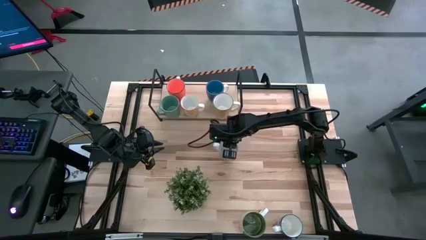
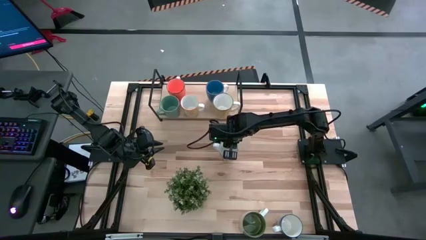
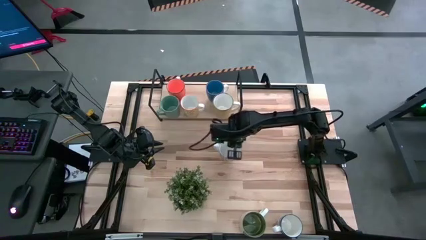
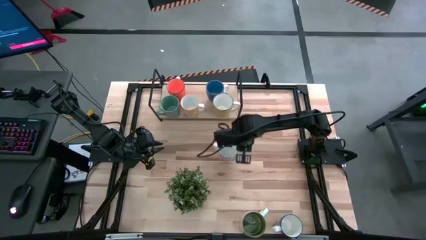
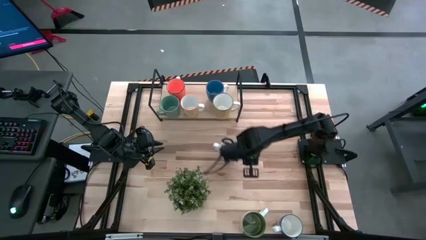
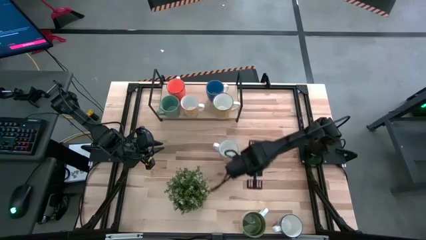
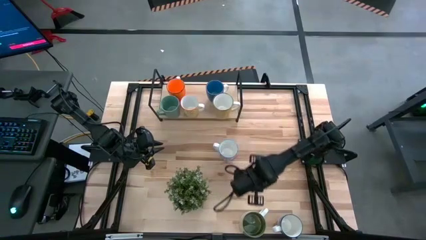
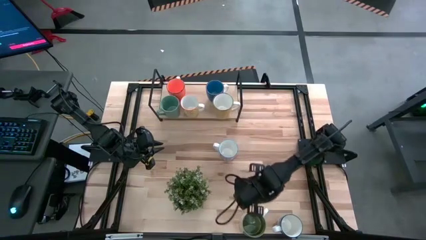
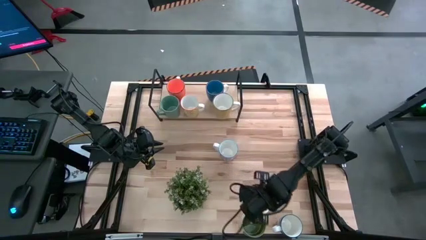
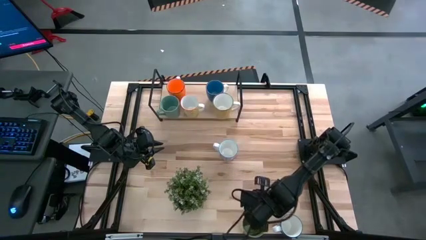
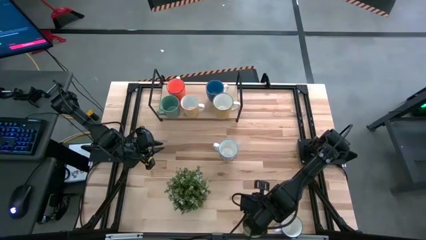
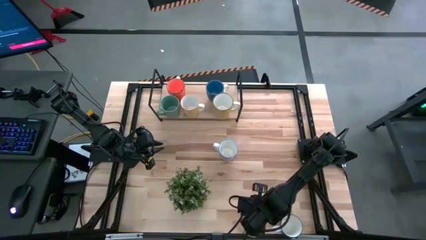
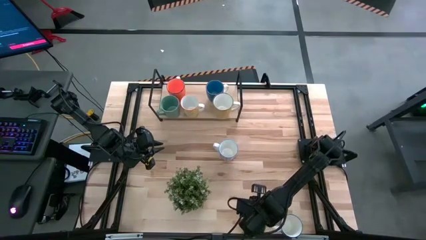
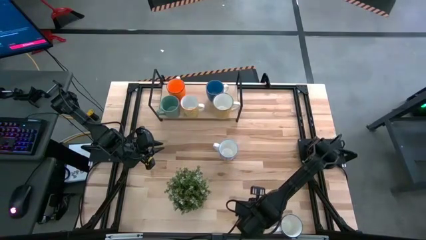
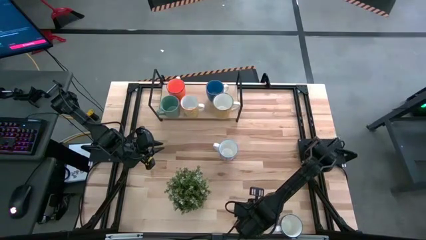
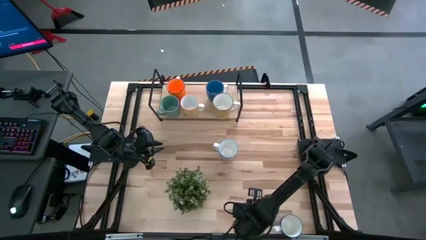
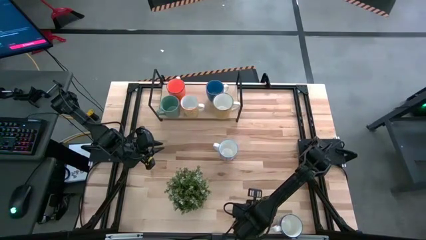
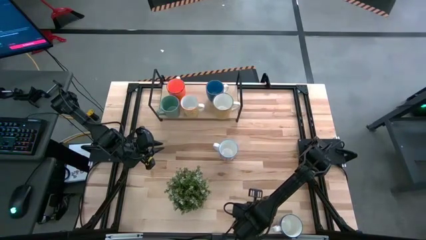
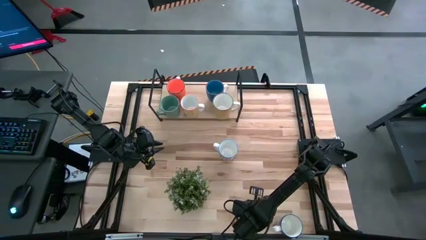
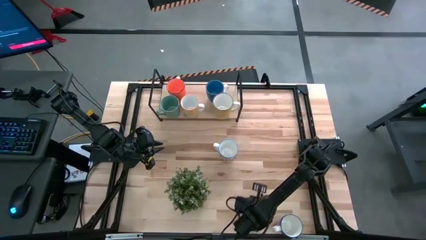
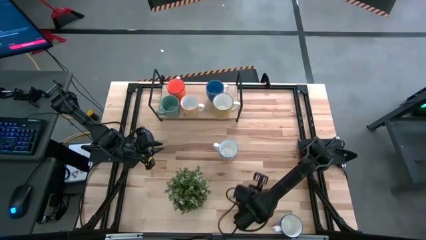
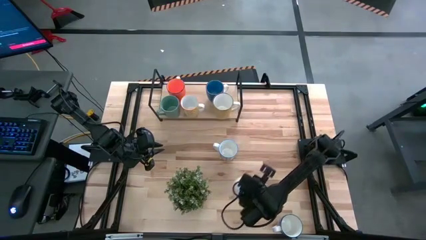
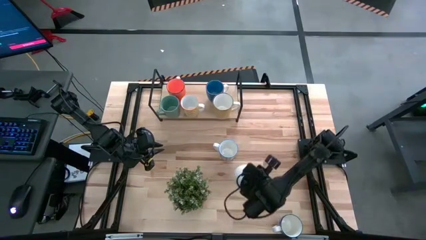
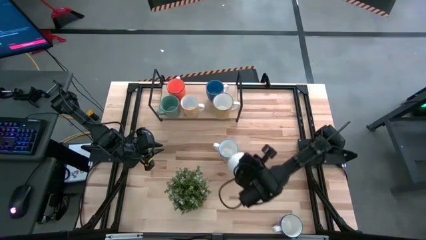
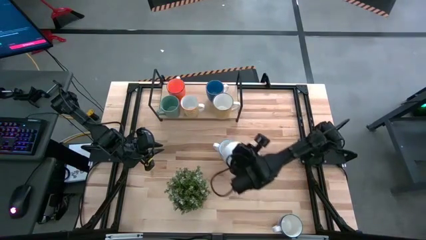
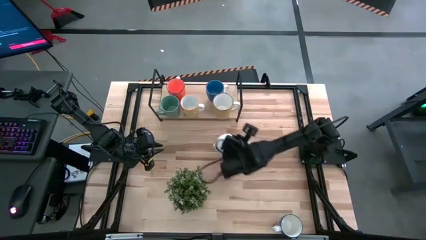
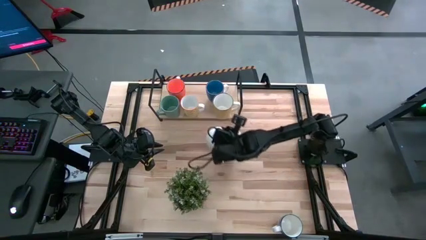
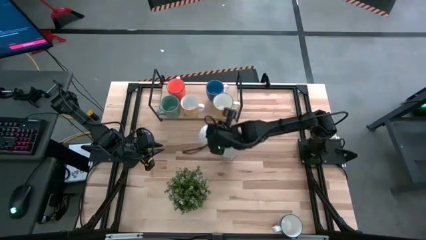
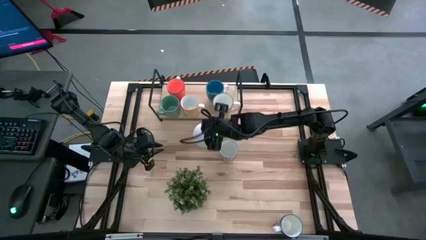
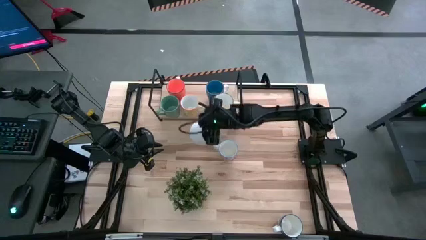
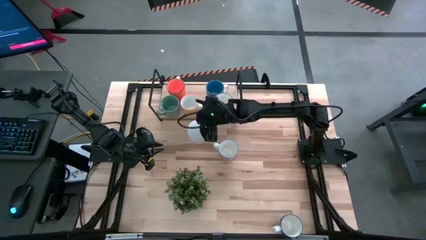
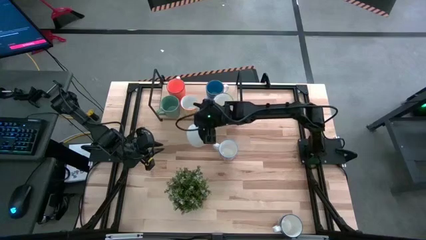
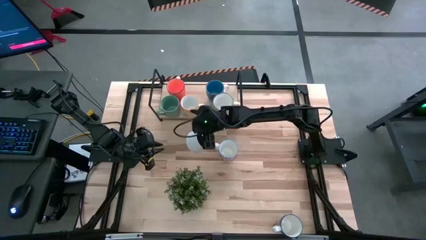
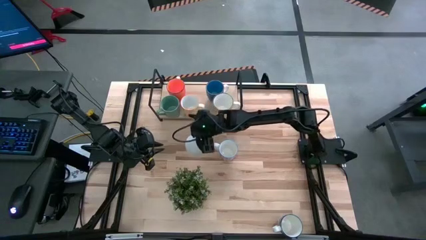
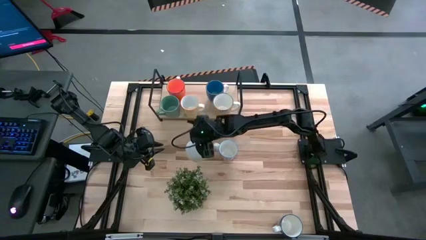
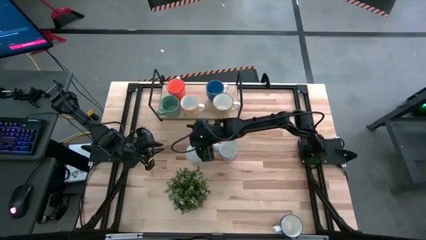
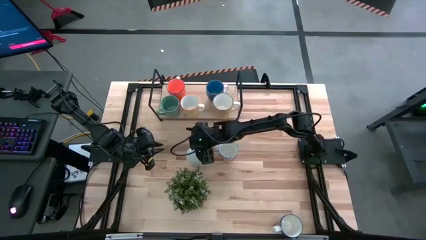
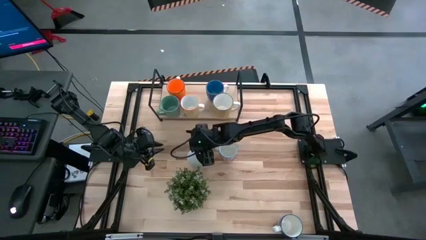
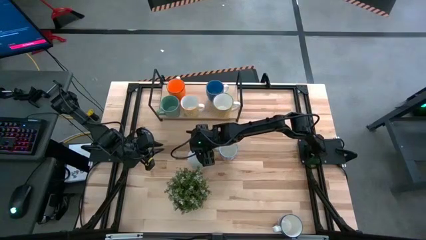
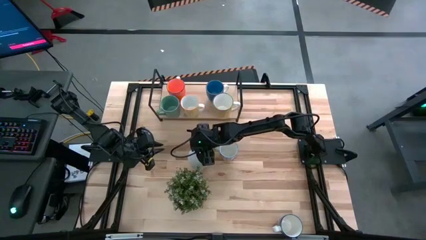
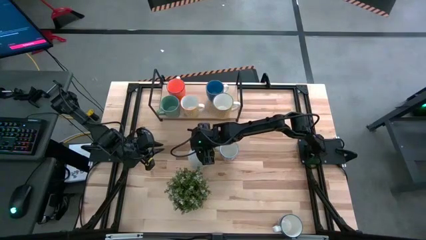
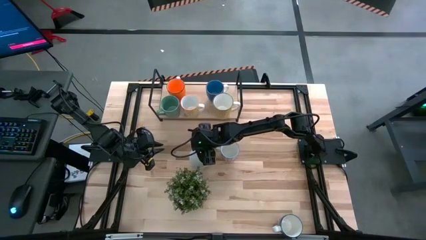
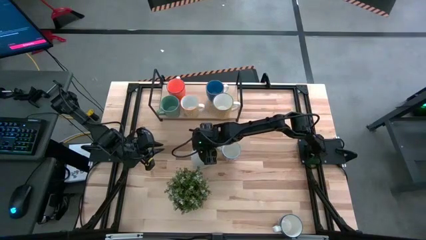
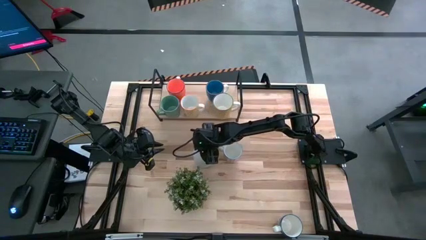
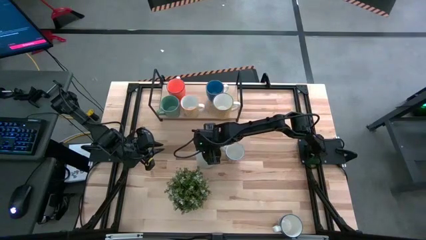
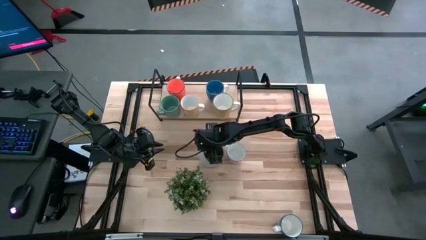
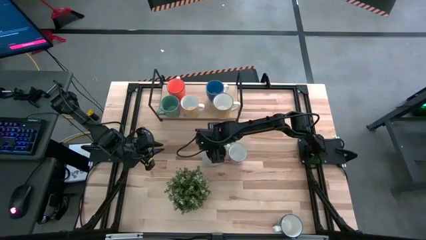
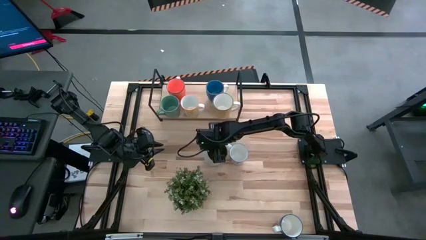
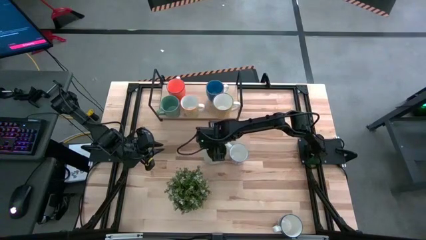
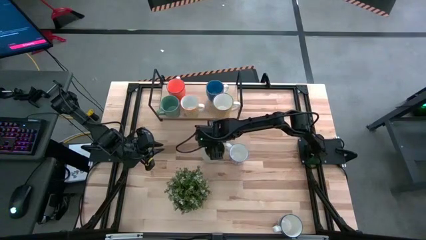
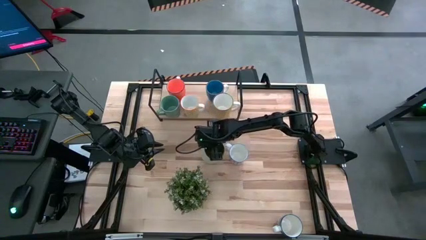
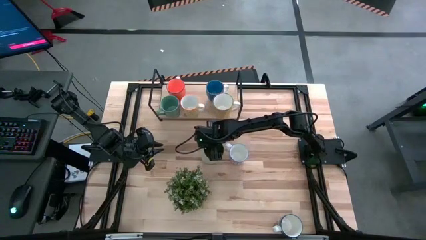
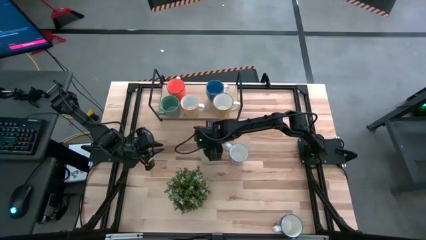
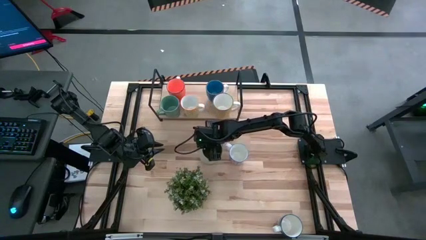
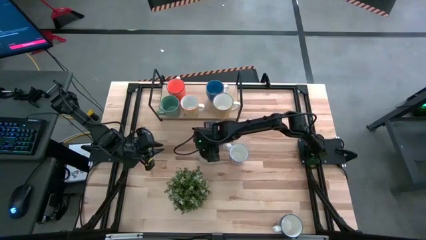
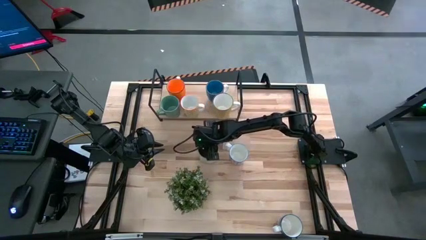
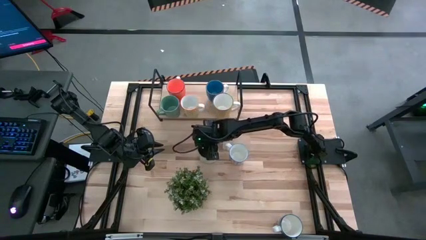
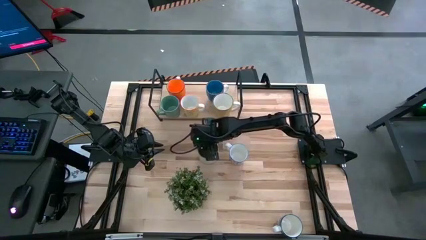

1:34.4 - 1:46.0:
Task: Place coffee mugs
Move the dark green mug to the middle of the table
